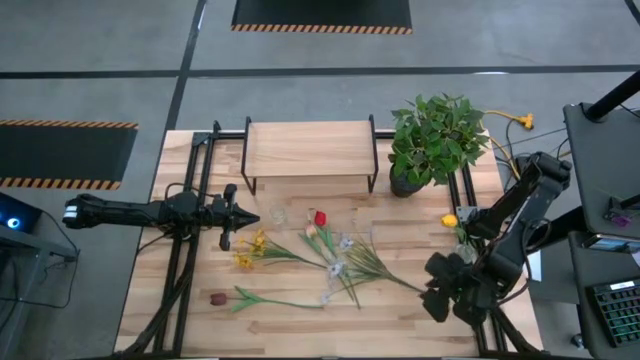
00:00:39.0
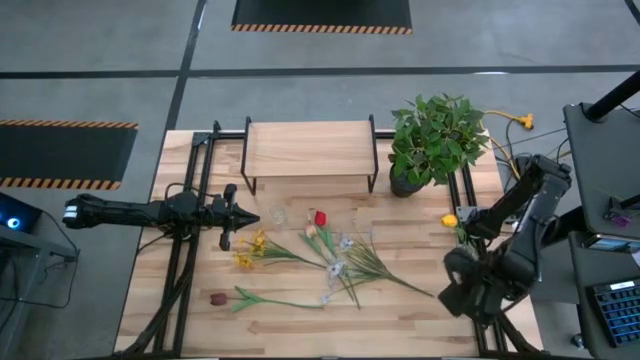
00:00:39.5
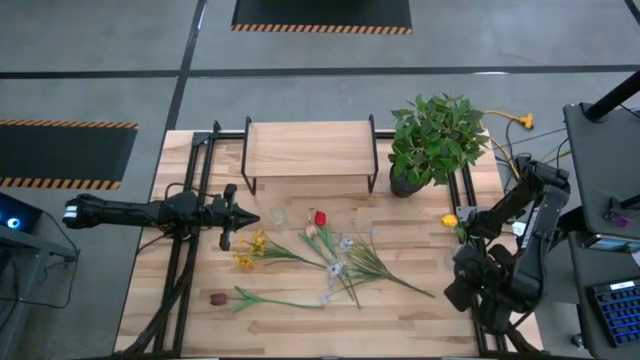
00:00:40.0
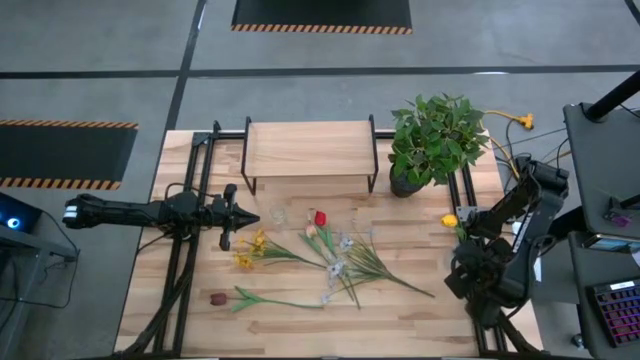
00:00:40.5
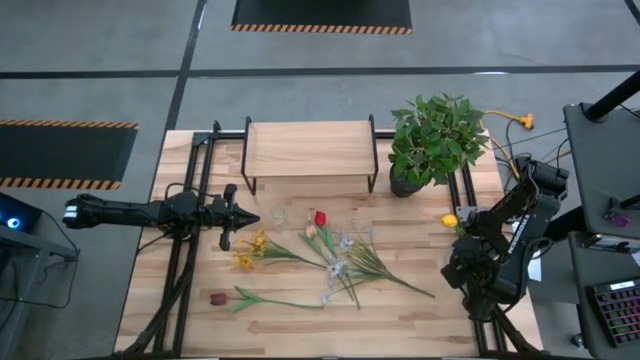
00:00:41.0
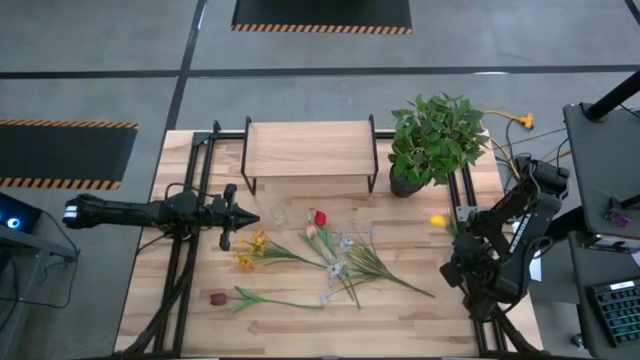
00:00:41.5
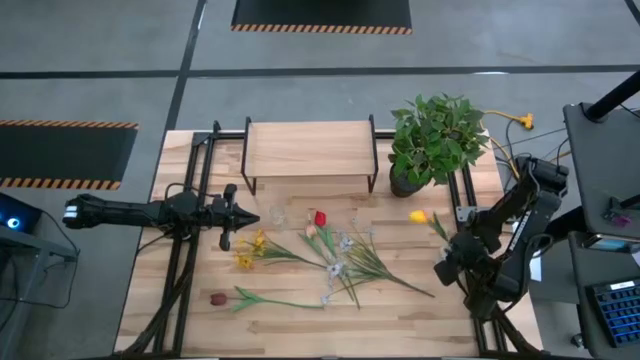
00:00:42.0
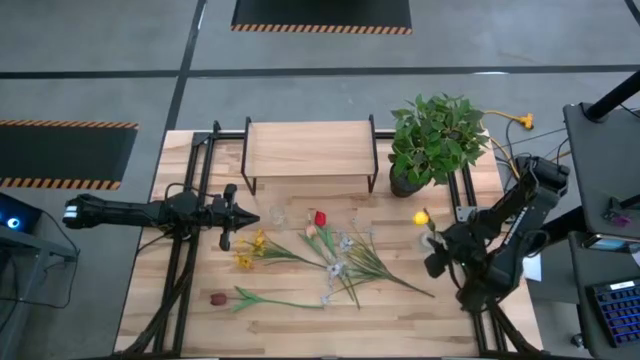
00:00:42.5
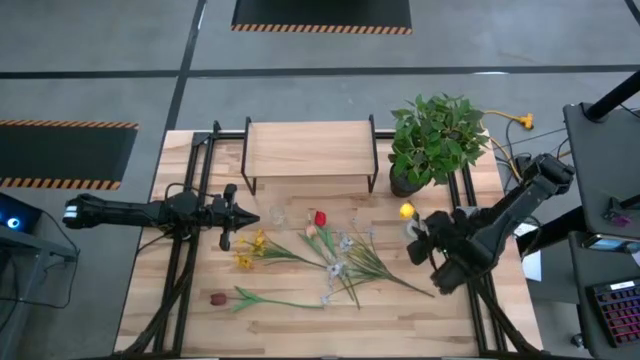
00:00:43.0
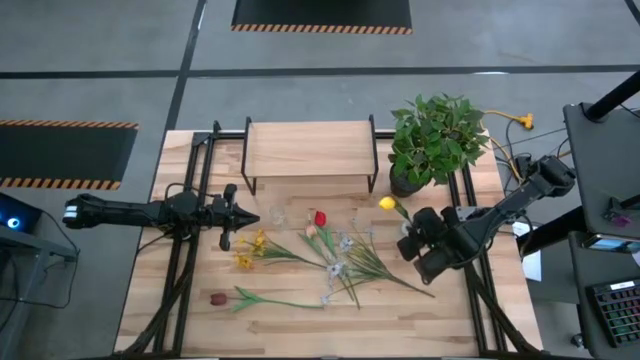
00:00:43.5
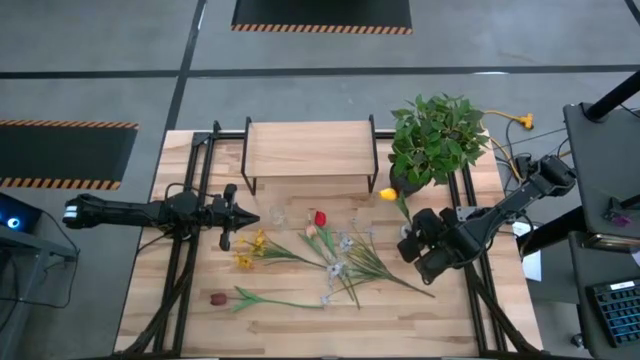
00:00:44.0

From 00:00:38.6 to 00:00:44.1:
Task: Pick and place flowers into a vace then onto a shelf
Adjust the right transparent vase

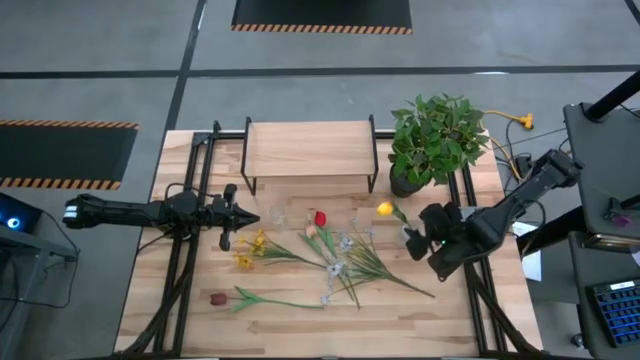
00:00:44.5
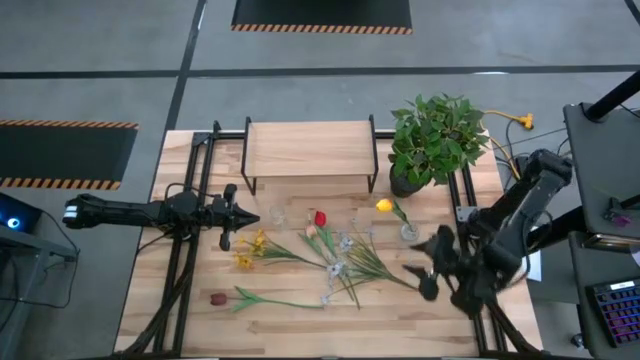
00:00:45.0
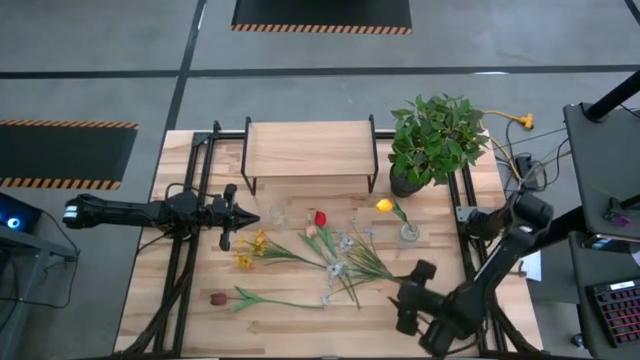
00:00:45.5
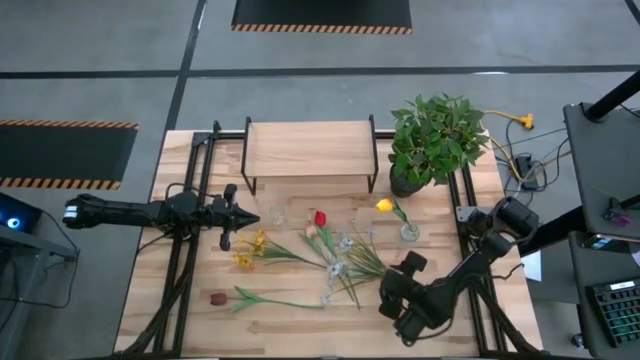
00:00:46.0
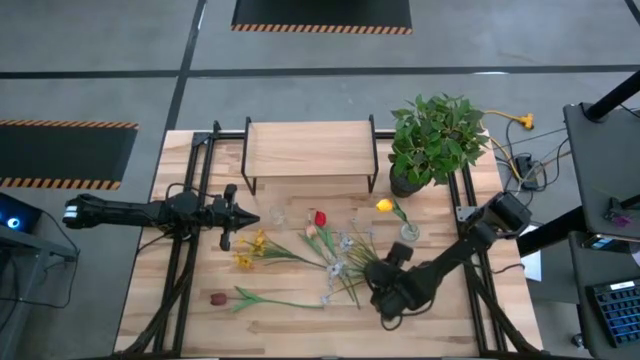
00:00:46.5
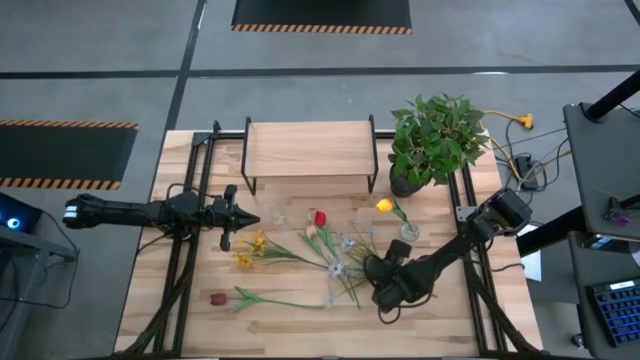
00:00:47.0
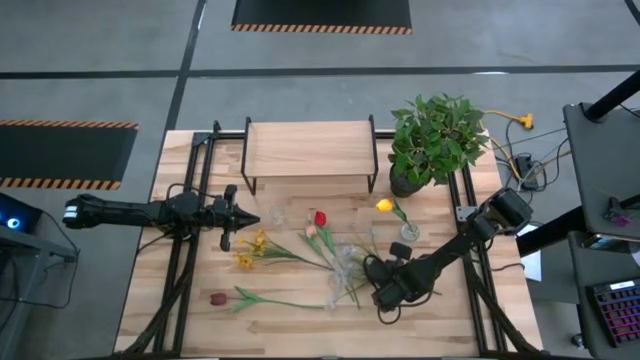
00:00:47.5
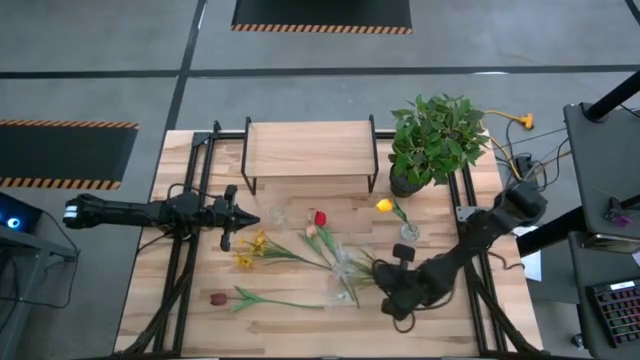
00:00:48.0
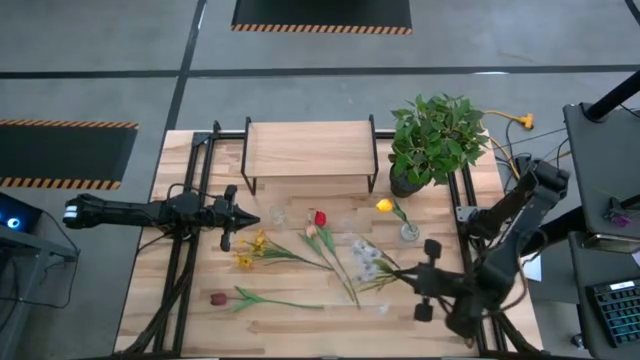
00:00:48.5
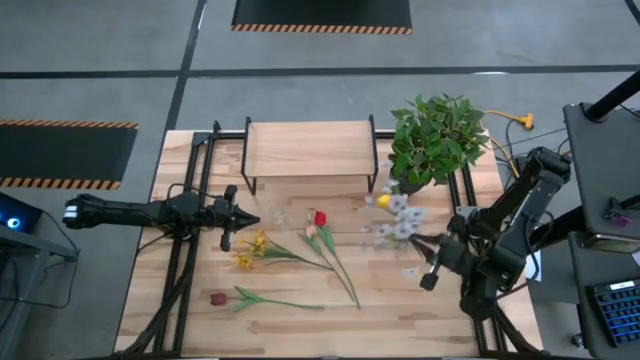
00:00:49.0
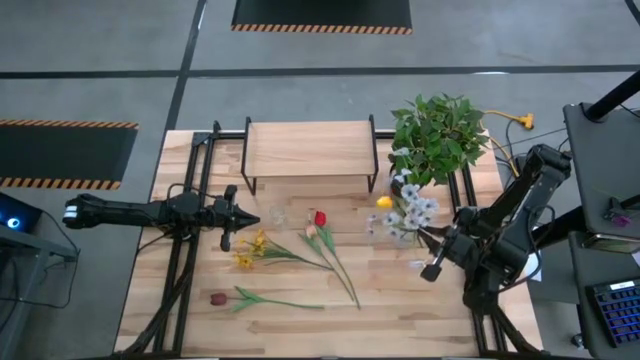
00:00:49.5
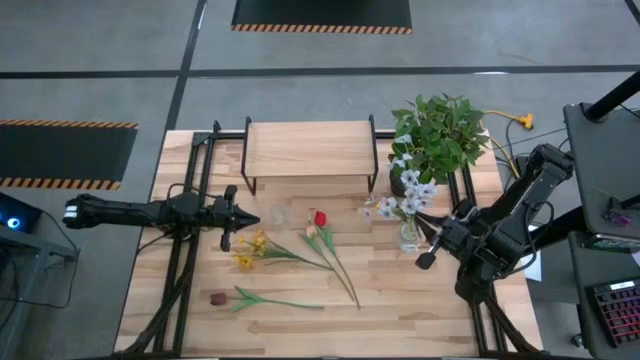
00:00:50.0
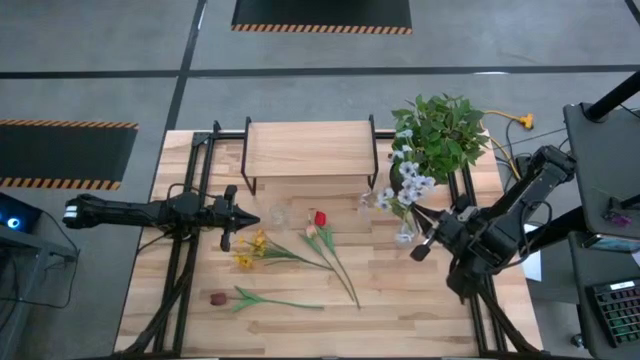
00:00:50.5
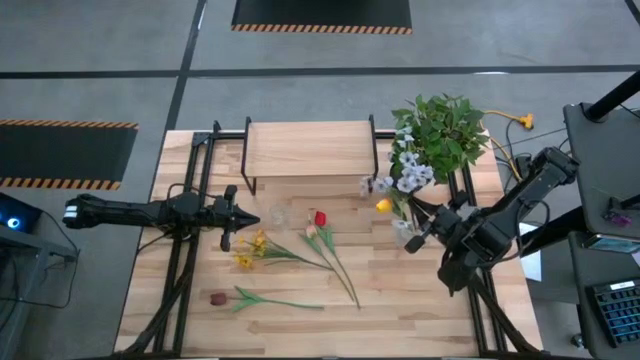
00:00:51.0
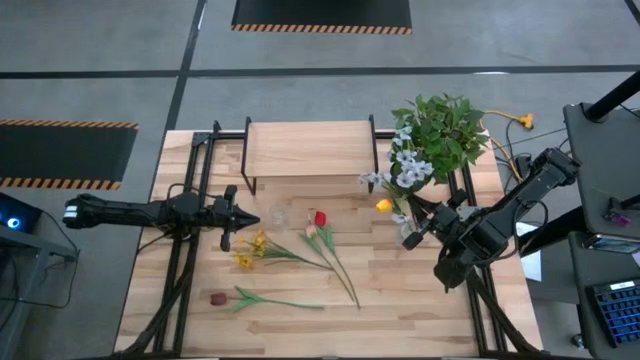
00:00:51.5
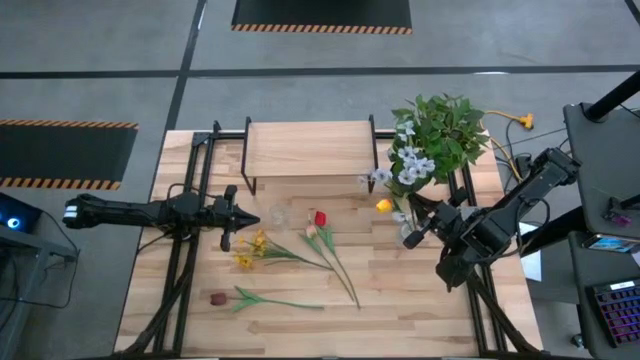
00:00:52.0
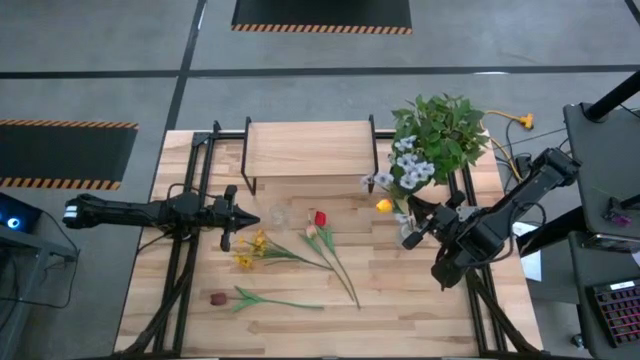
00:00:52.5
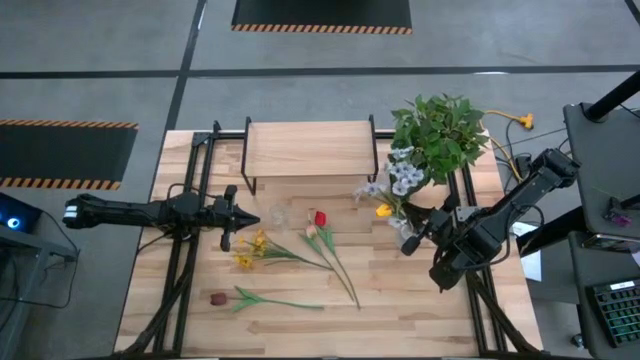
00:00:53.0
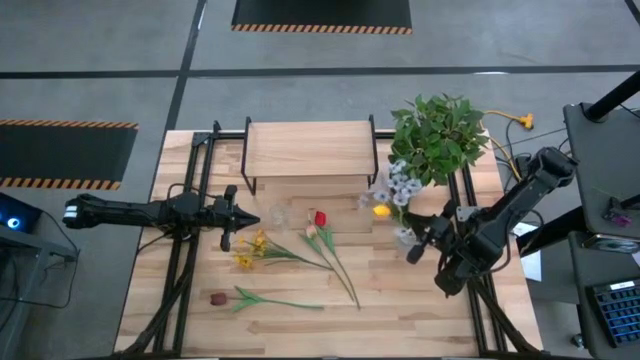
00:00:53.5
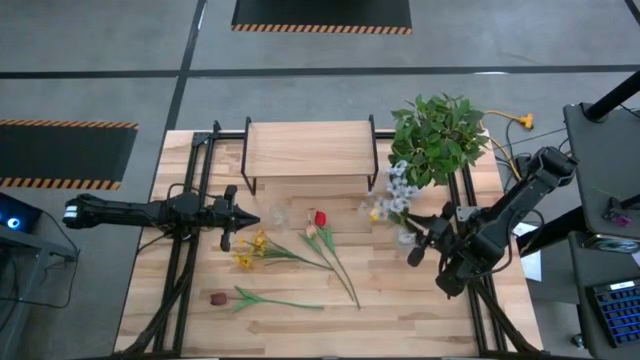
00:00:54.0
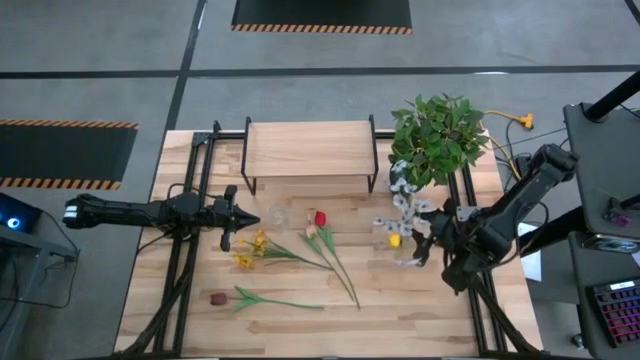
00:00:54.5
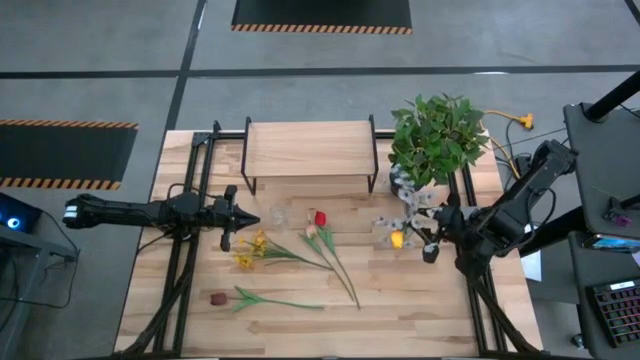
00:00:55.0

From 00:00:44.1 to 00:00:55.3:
Put the white flowers into the right transparent vase

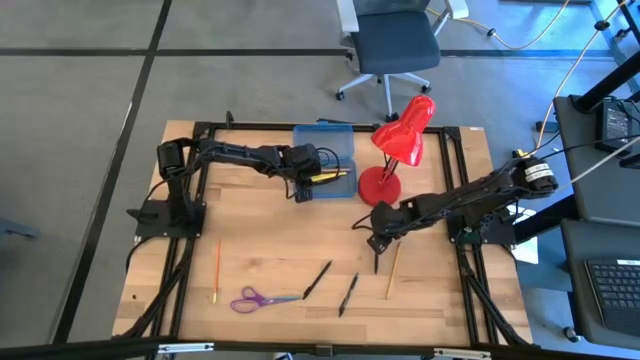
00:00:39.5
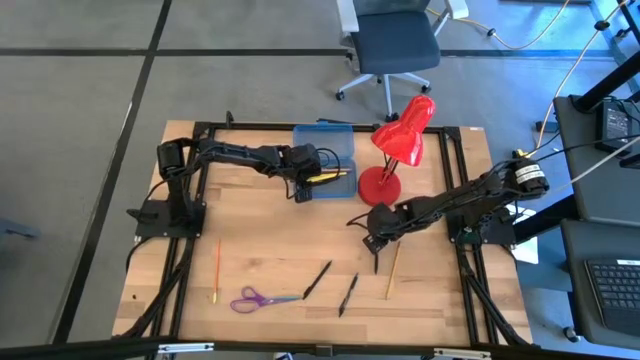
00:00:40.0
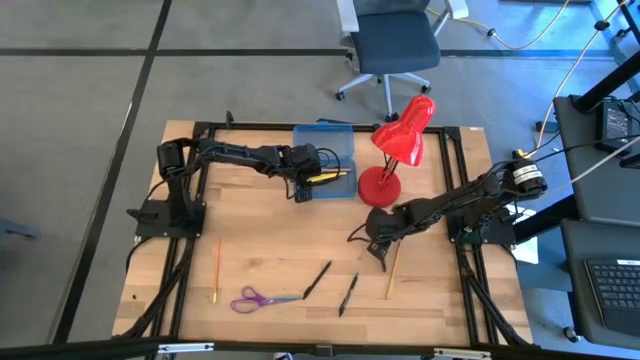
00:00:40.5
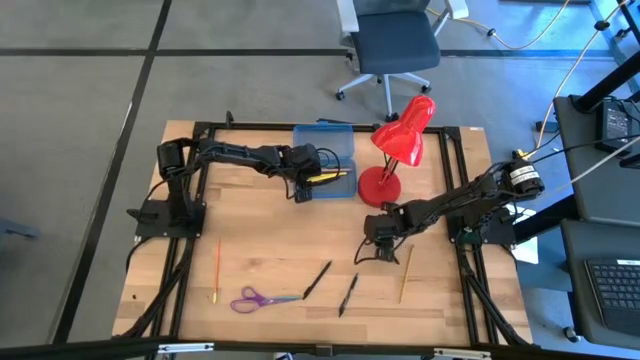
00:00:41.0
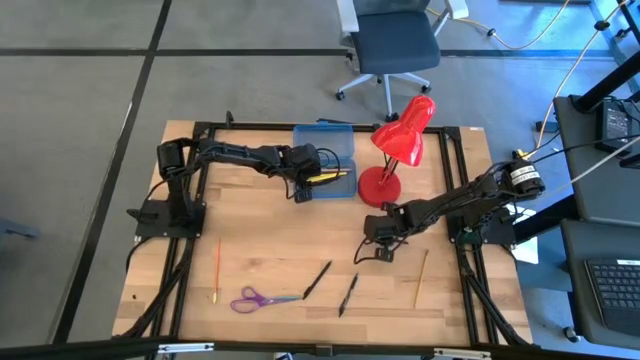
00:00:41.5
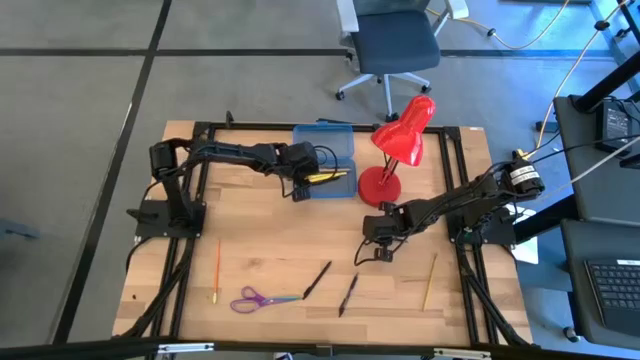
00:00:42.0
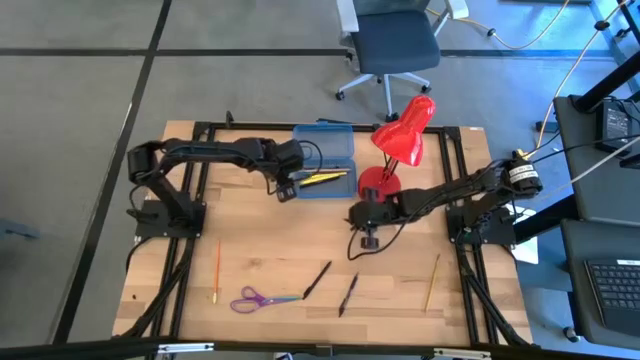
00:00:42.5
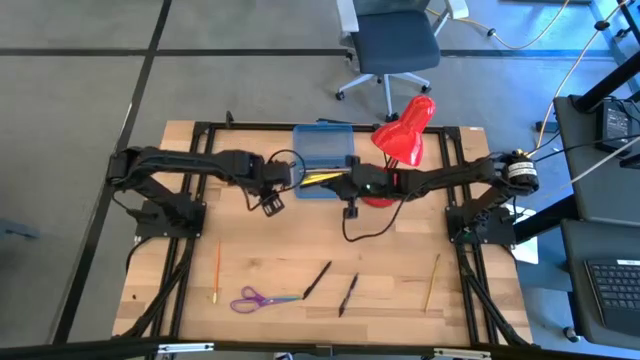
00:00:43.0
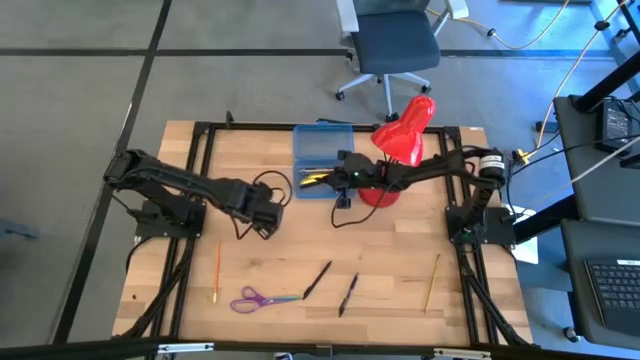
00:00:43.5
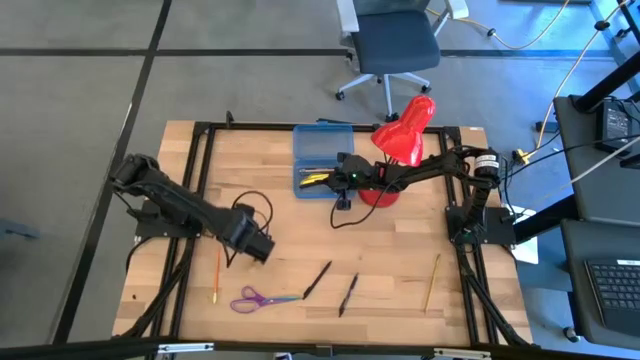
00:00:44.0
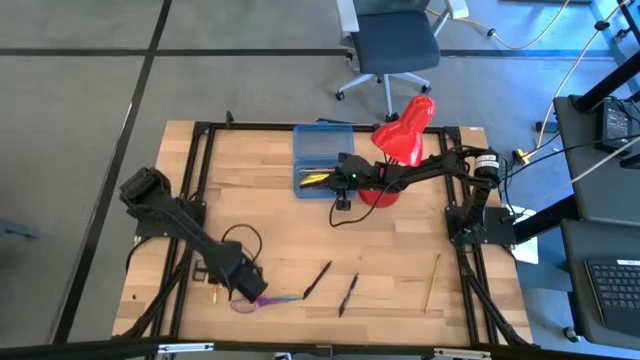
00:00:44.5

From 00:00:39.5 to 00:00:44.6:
Task: Pick & place school supplies into a supply box
Put the black pen into the blue supply box
